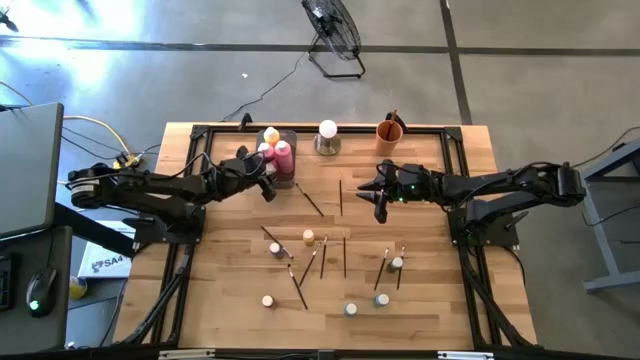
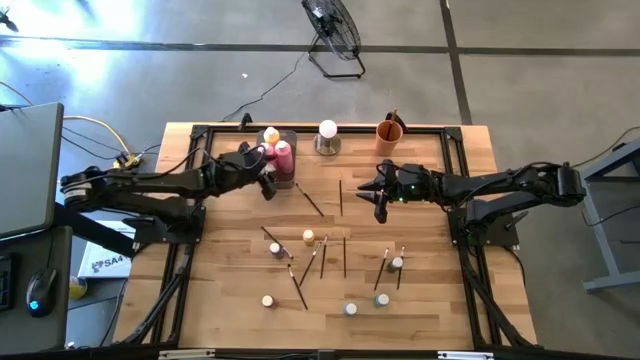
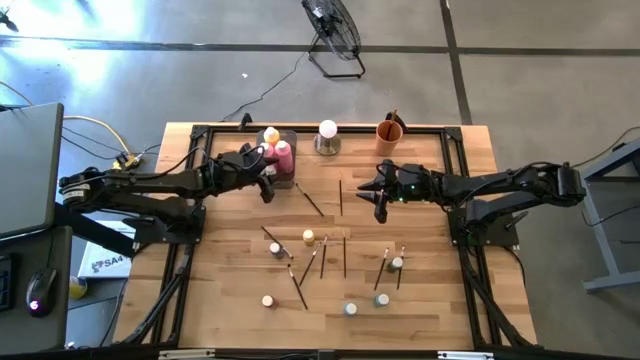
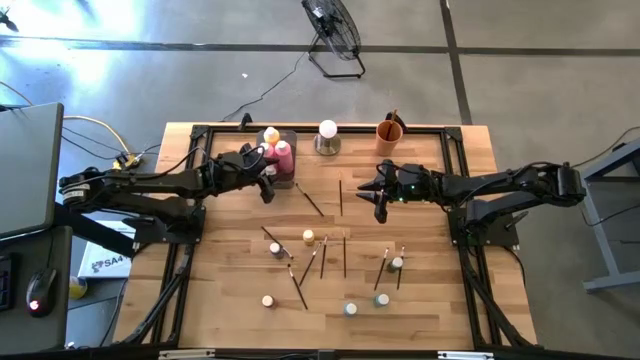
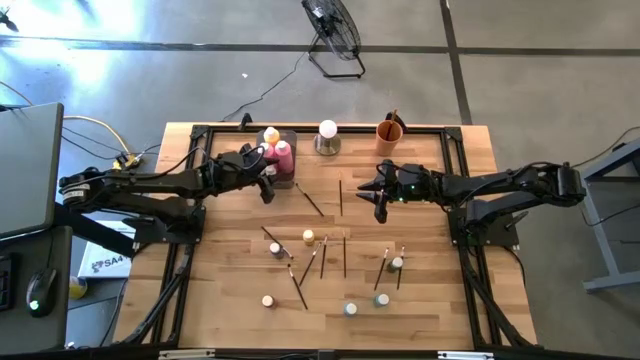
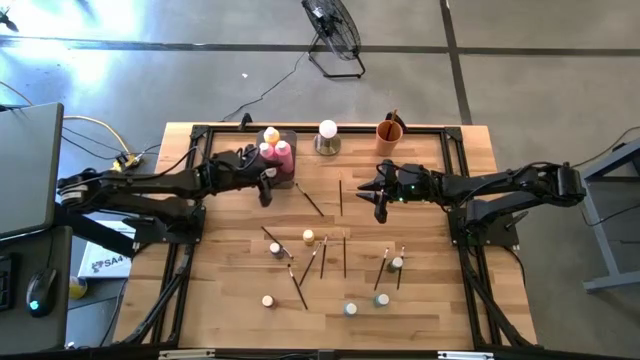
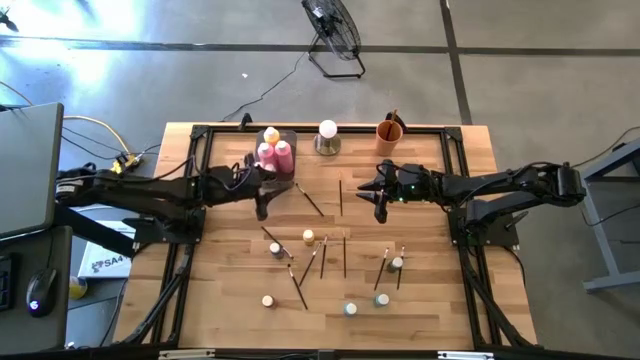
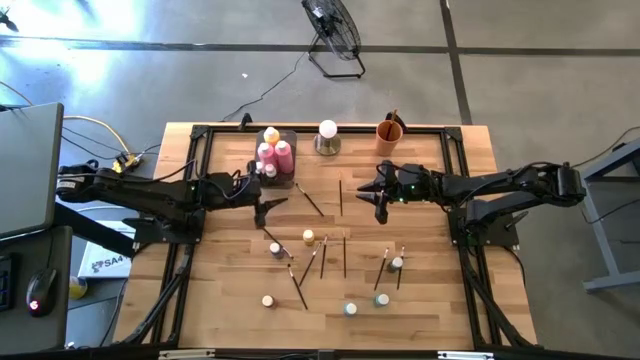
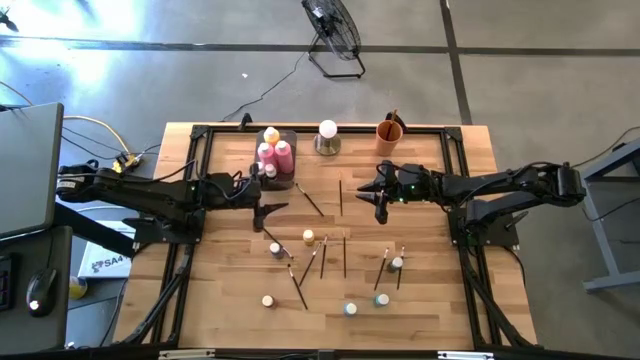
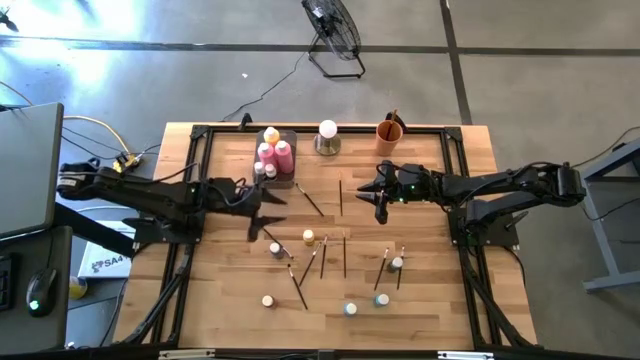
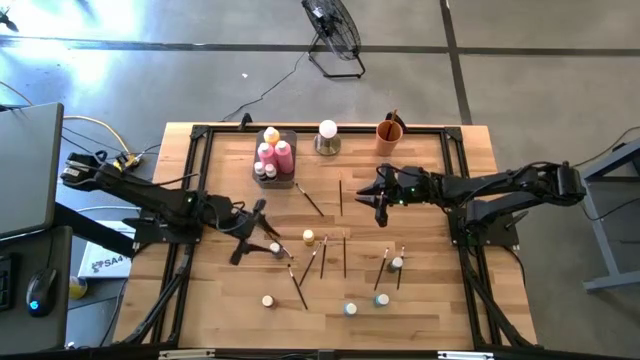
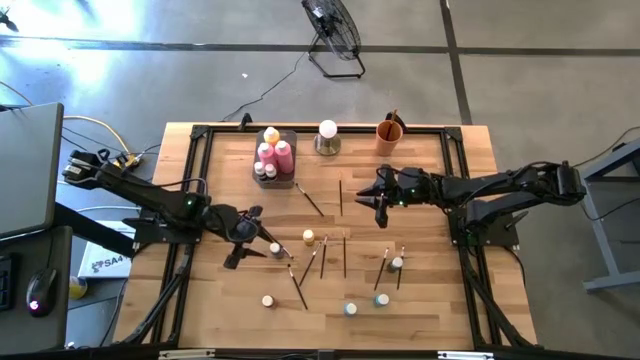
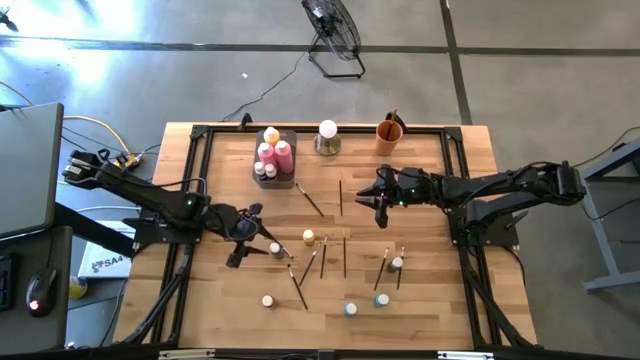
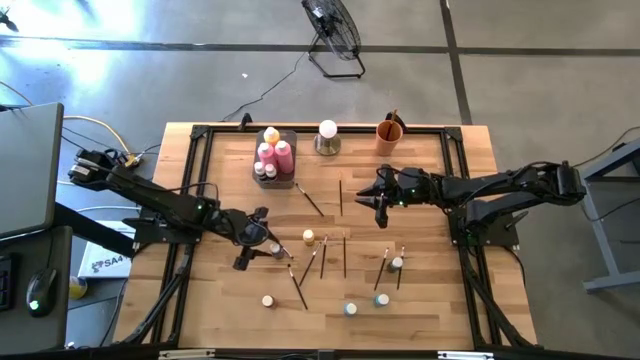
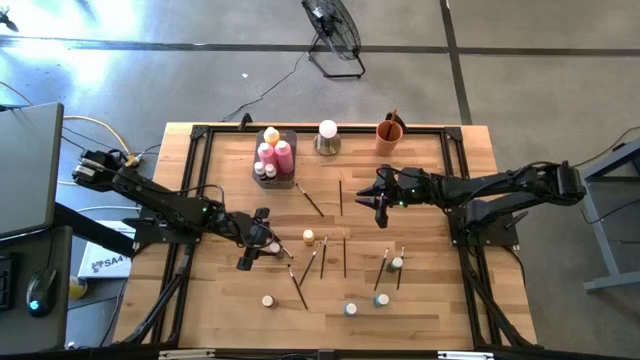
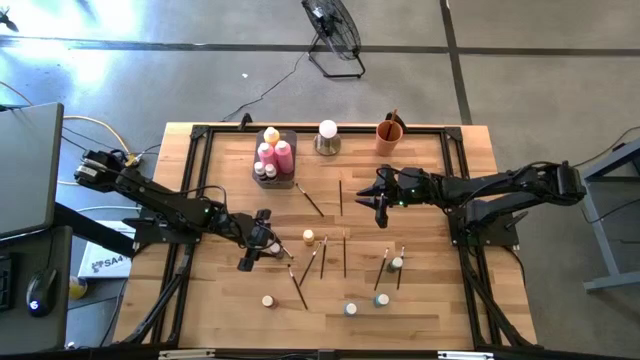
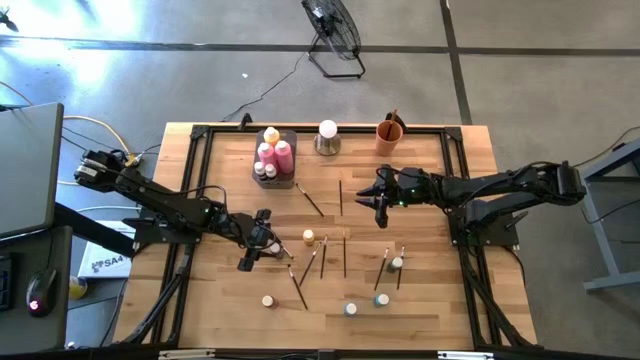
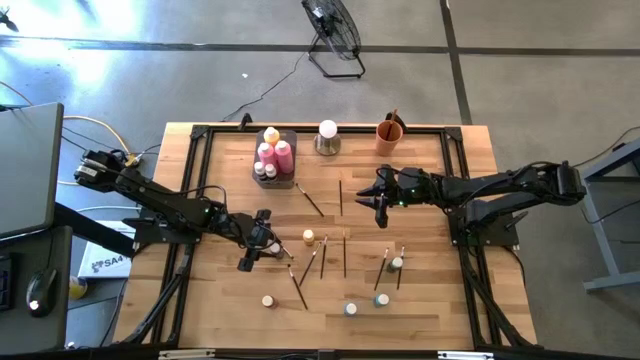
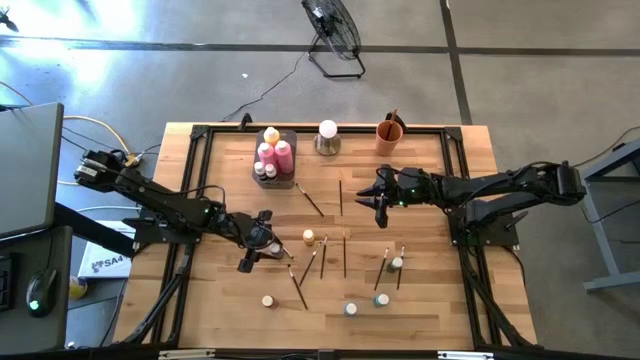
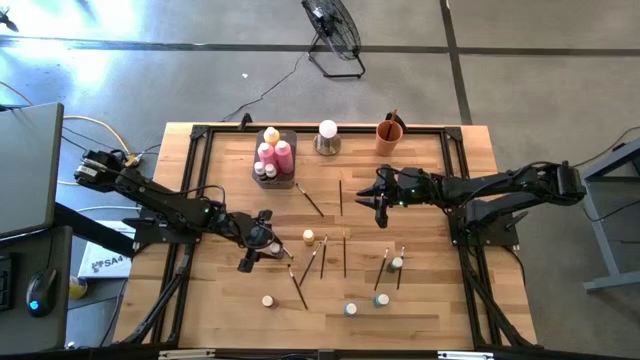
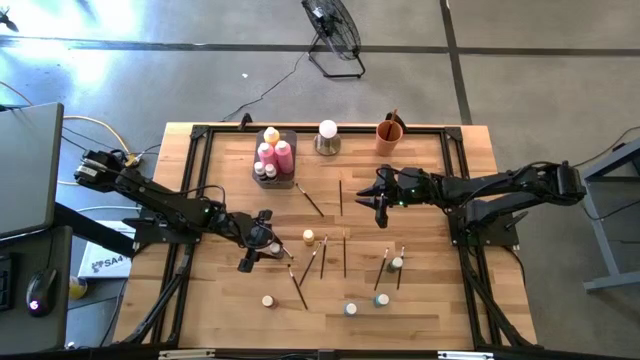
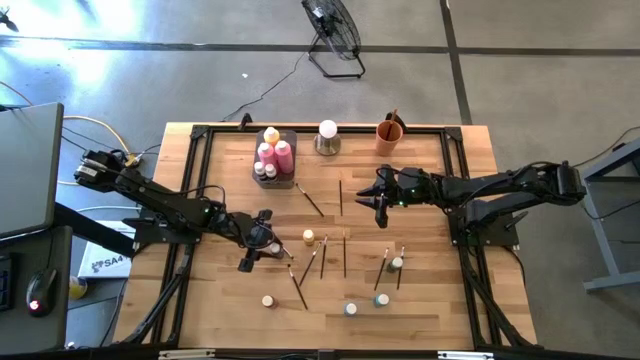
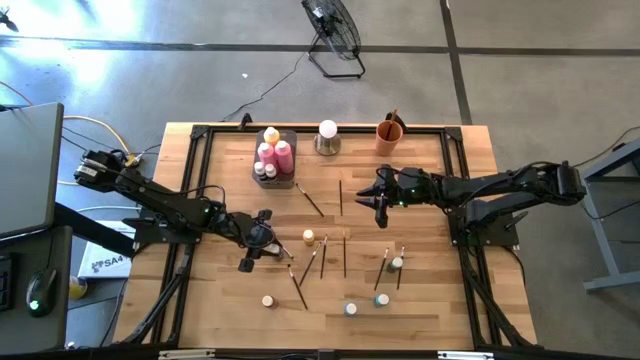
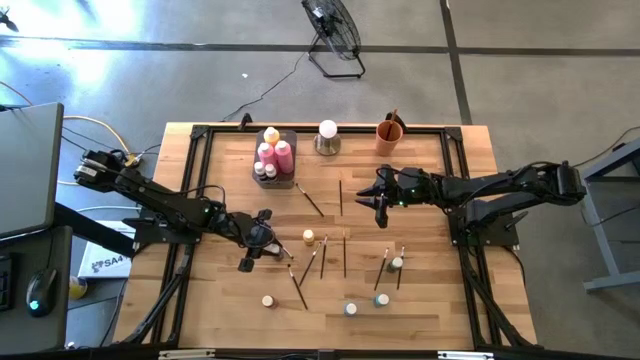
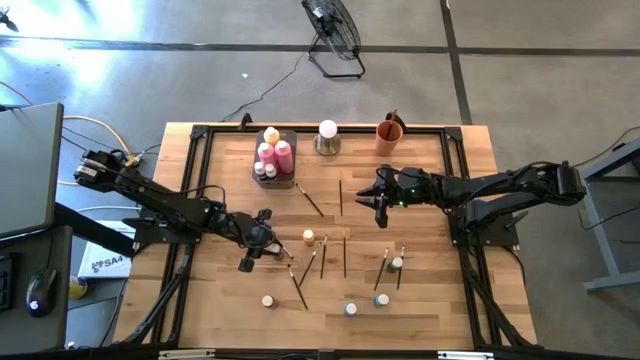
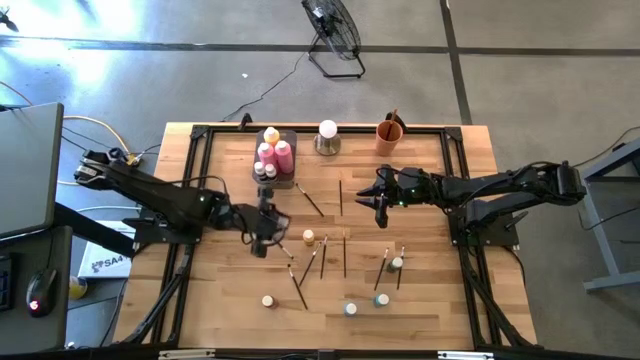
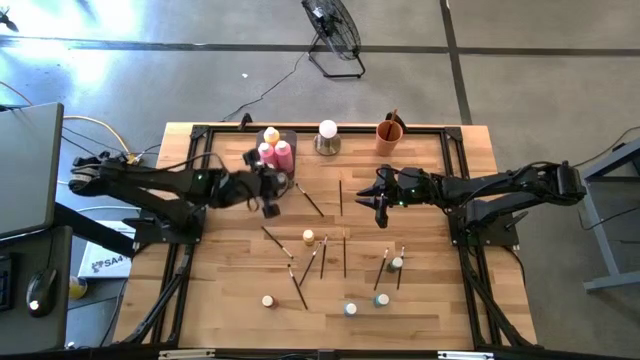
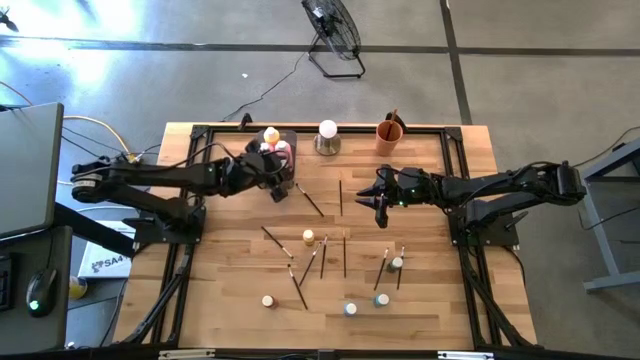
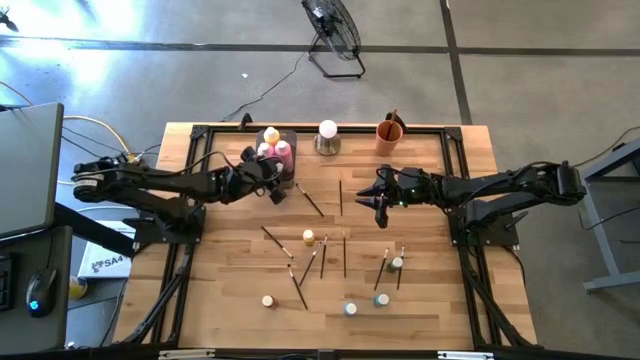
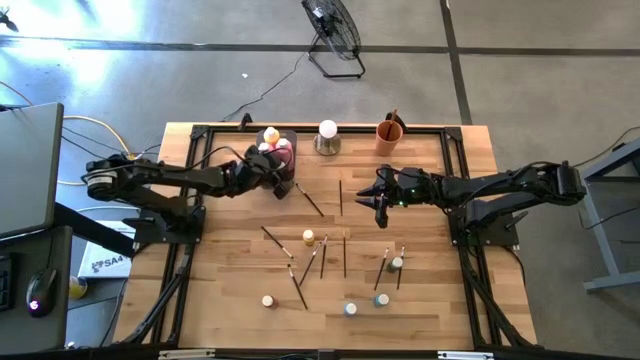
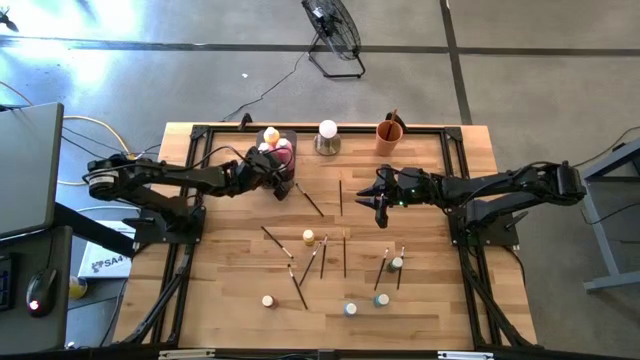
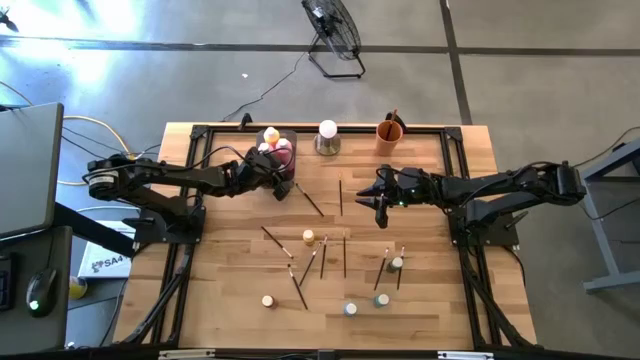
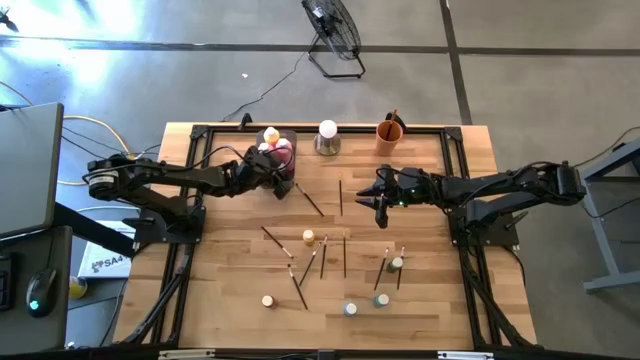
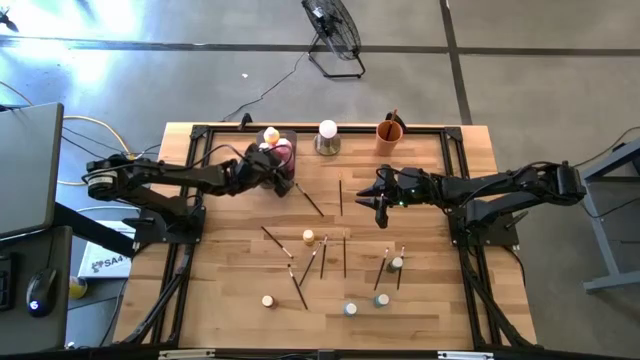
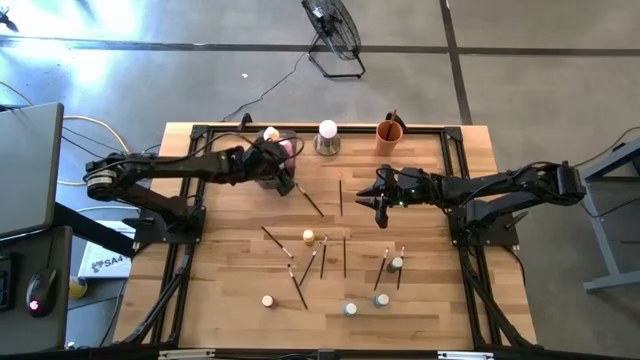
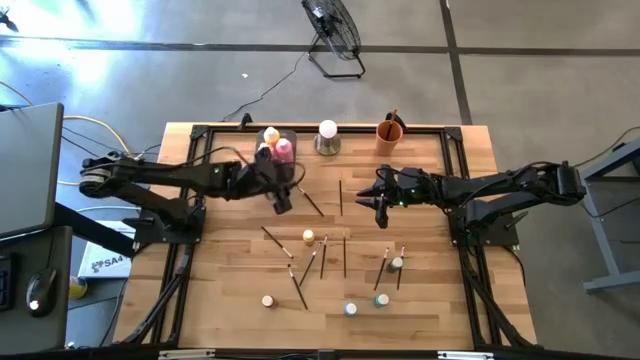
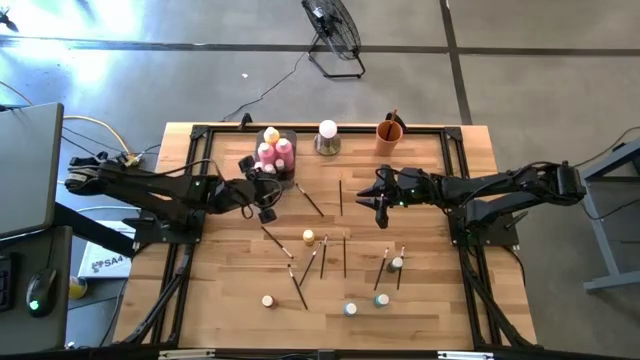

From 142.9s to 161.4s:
Task: Pick & Place Paint Supplies
Put the small blue paint bottle into the gray bin

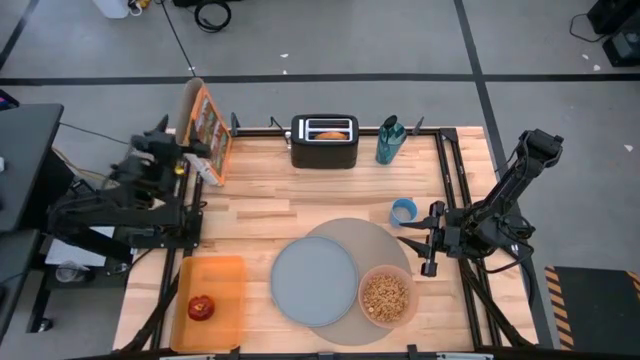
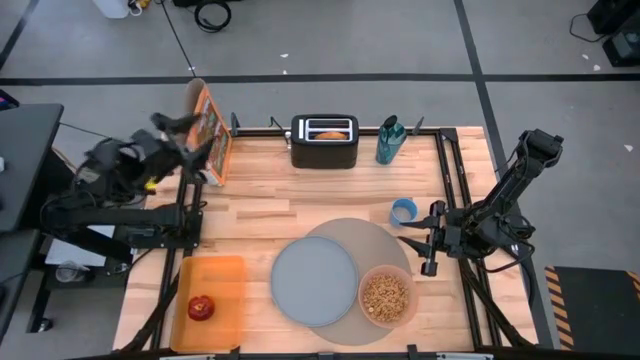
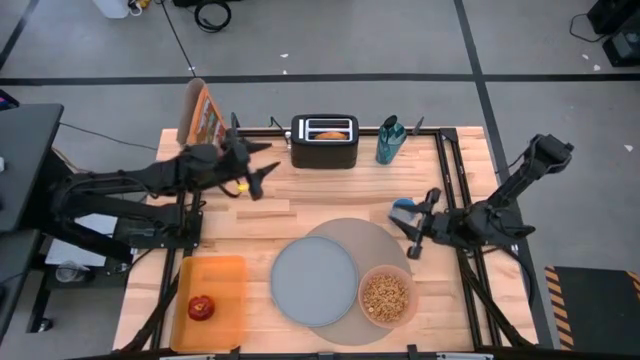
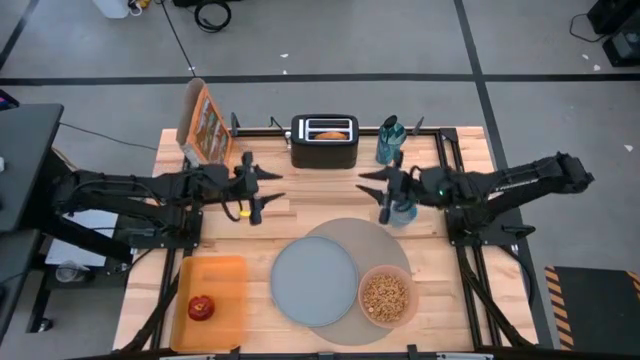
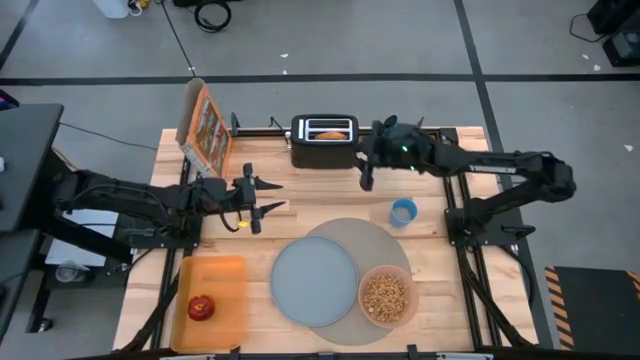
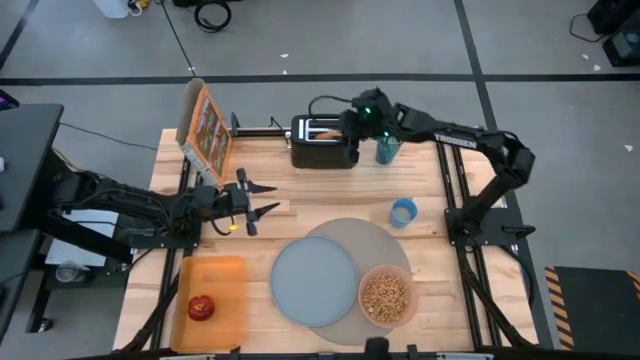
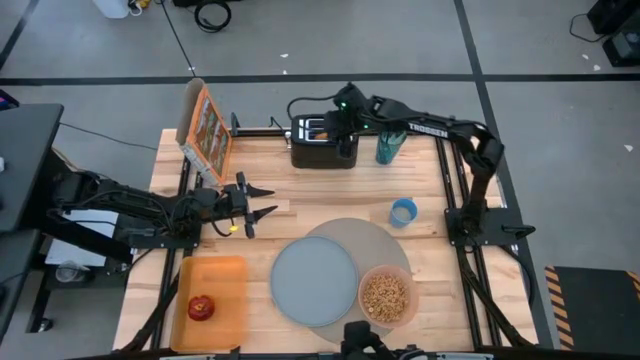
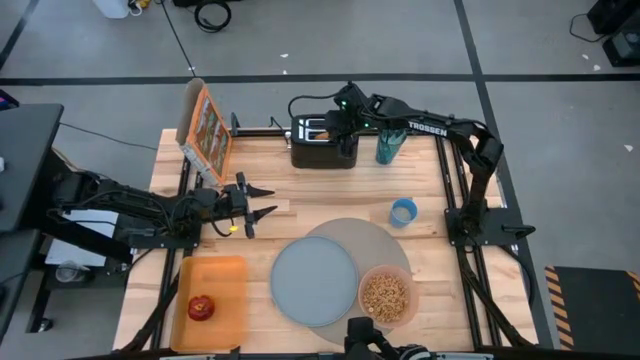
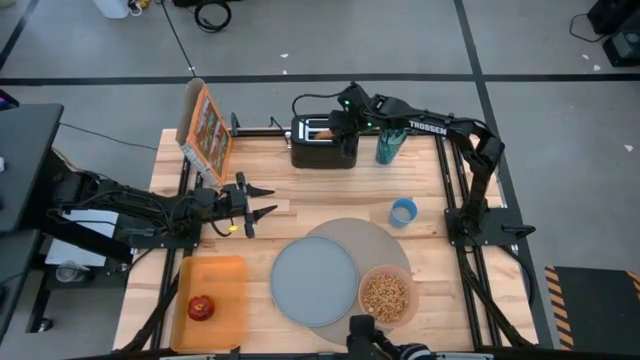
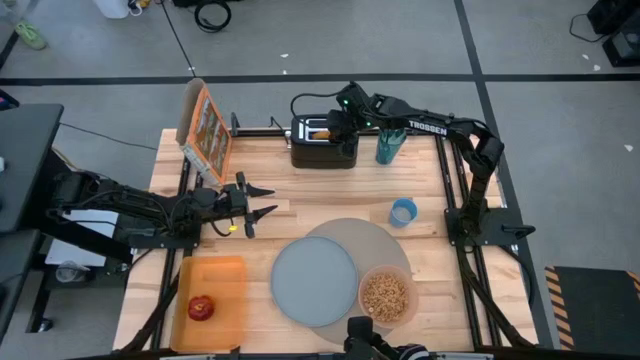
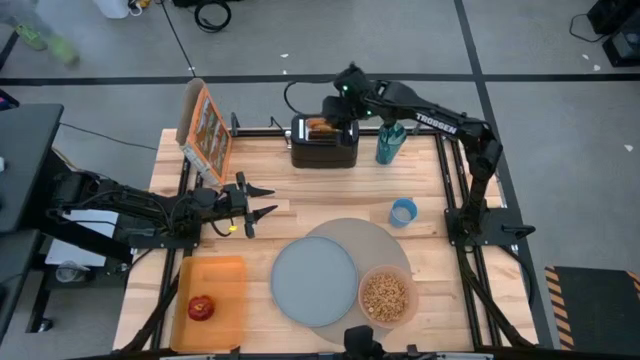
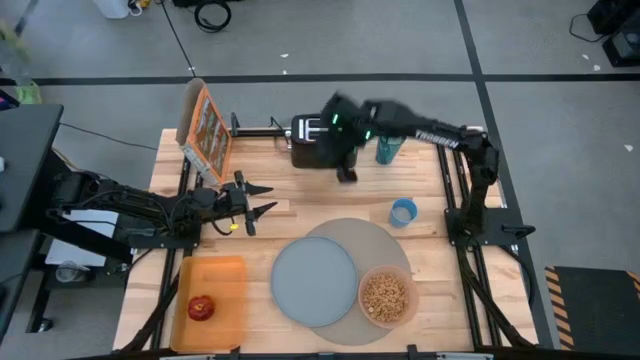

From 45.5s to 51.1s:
Task: Arrange a breakfast setting
Put the bagel on the blue plate from the toaster on the brown placemat
